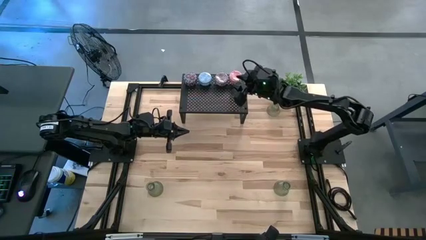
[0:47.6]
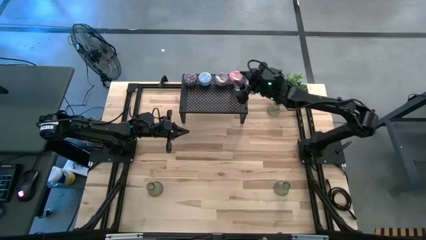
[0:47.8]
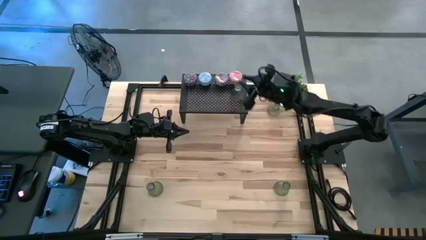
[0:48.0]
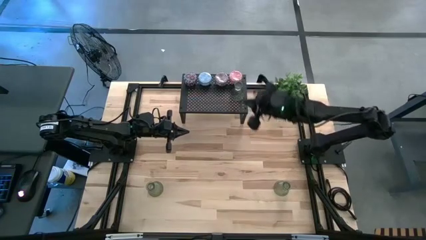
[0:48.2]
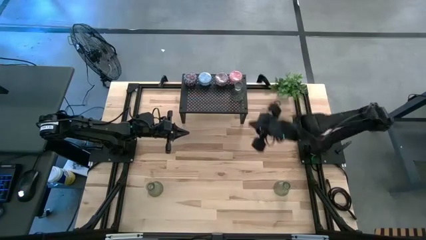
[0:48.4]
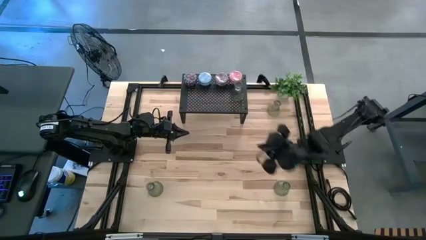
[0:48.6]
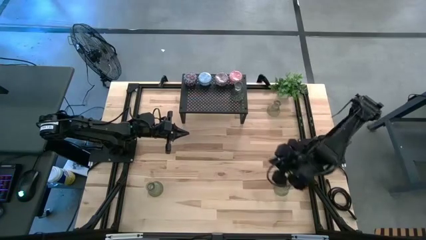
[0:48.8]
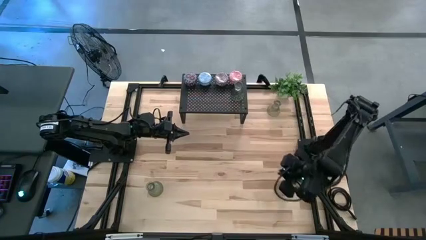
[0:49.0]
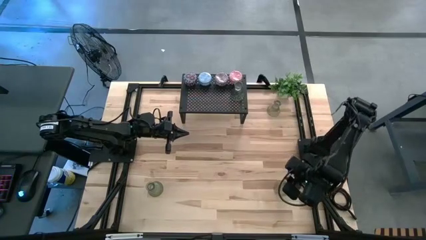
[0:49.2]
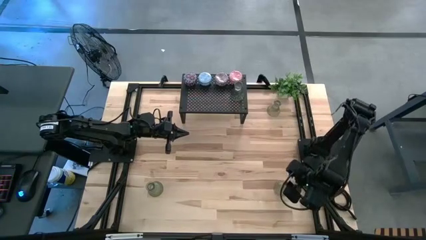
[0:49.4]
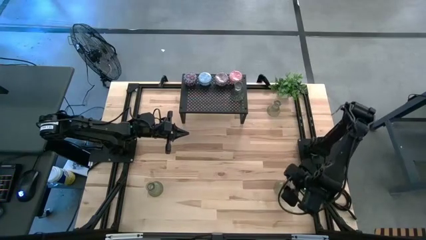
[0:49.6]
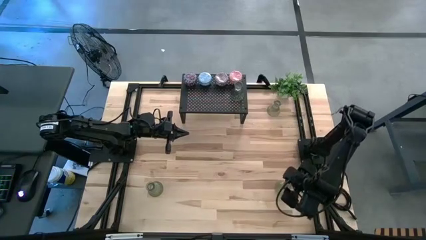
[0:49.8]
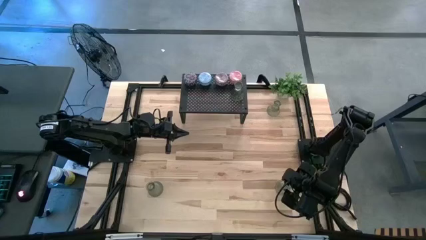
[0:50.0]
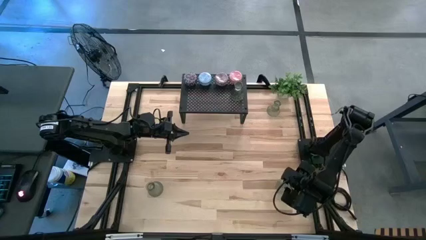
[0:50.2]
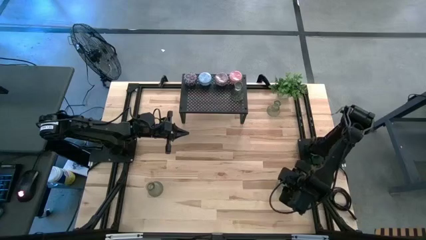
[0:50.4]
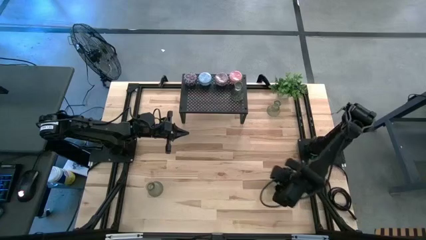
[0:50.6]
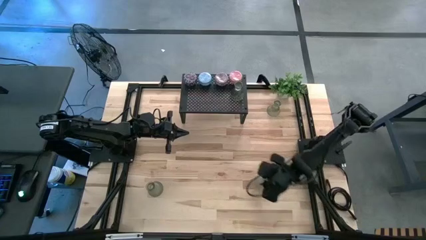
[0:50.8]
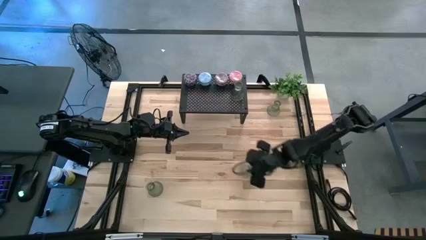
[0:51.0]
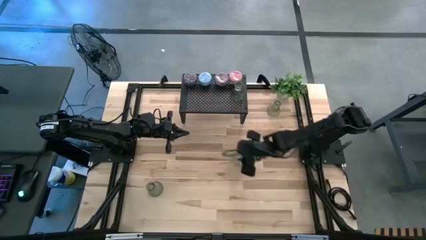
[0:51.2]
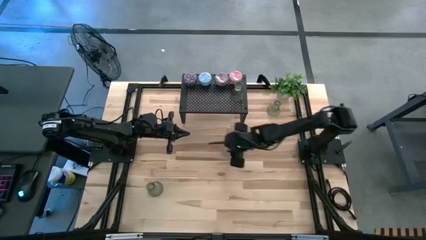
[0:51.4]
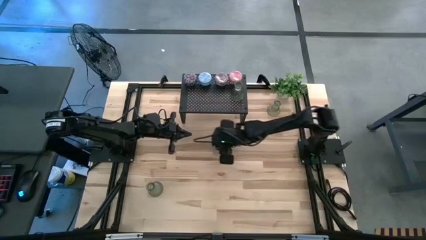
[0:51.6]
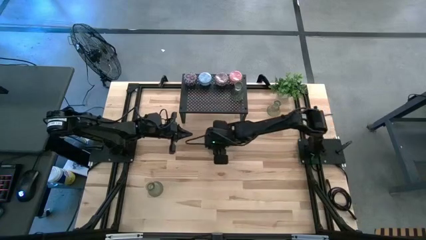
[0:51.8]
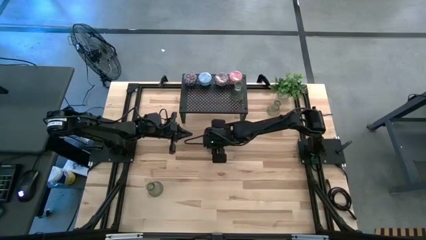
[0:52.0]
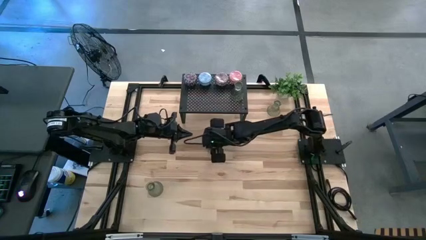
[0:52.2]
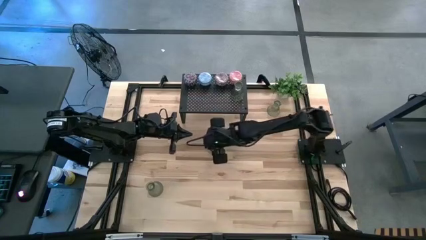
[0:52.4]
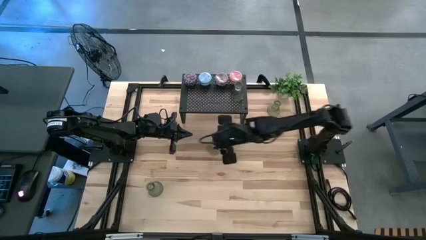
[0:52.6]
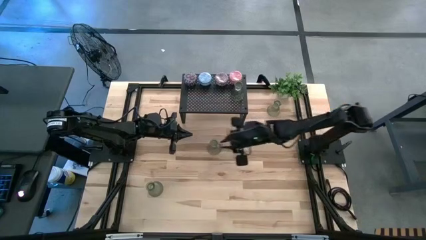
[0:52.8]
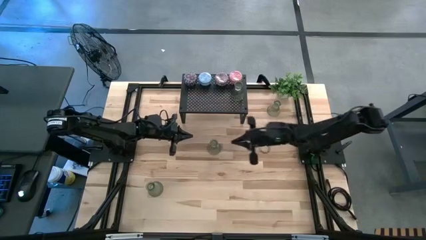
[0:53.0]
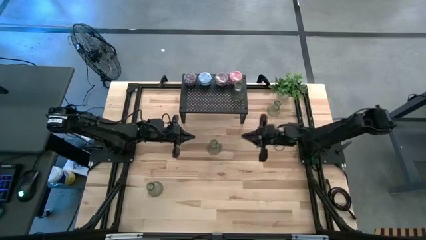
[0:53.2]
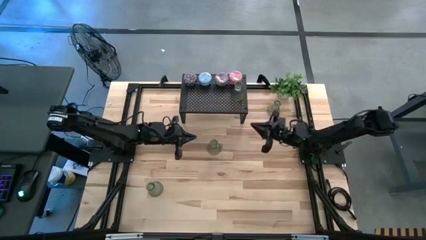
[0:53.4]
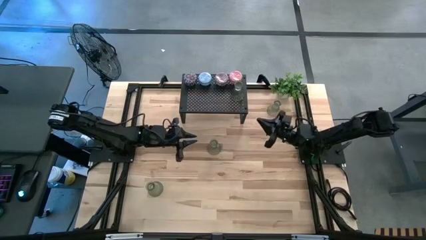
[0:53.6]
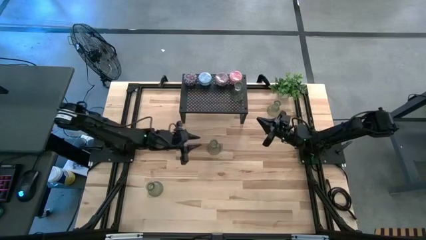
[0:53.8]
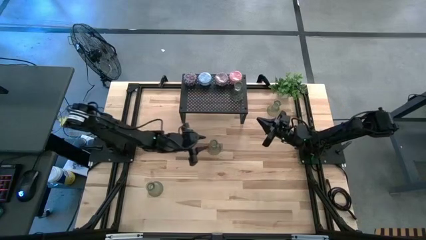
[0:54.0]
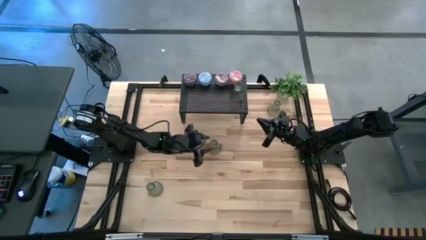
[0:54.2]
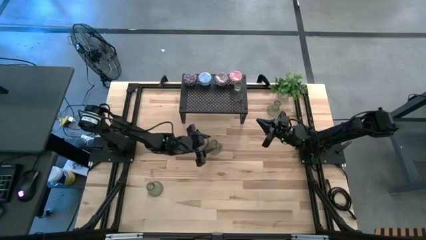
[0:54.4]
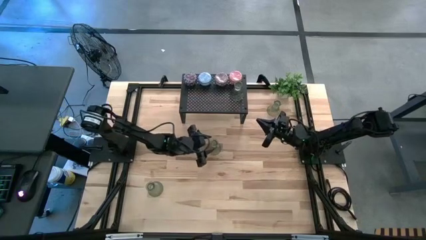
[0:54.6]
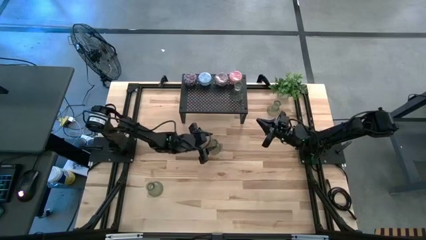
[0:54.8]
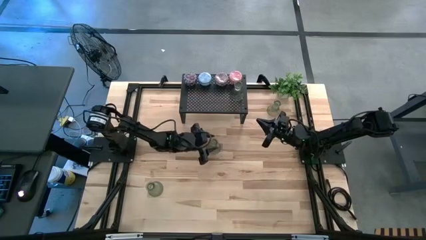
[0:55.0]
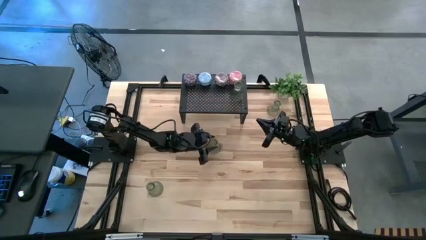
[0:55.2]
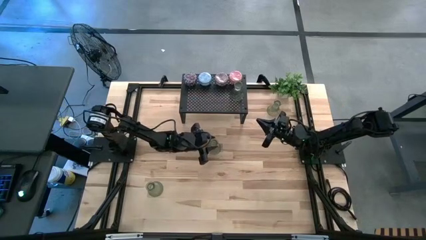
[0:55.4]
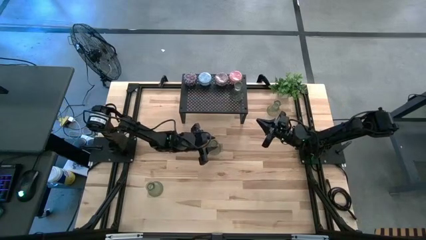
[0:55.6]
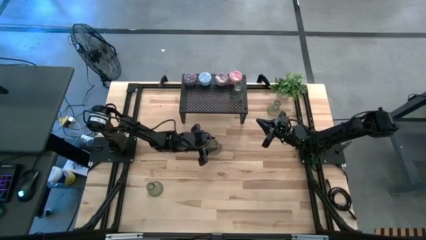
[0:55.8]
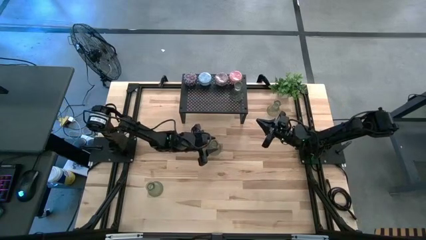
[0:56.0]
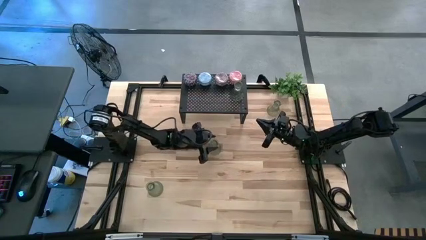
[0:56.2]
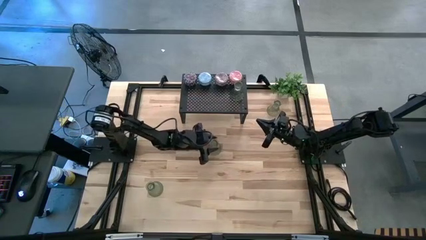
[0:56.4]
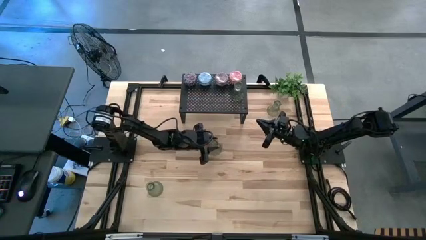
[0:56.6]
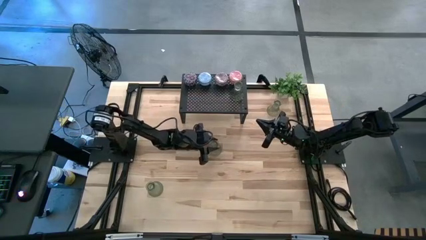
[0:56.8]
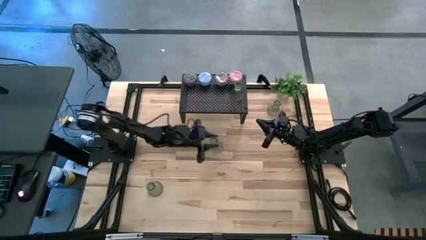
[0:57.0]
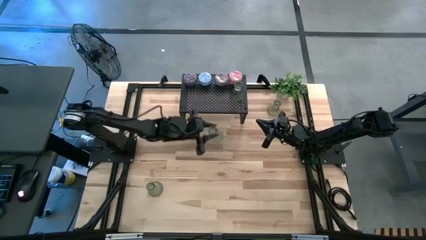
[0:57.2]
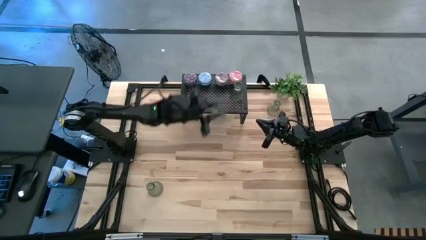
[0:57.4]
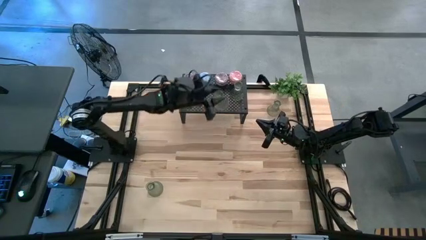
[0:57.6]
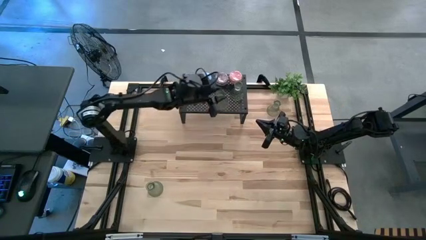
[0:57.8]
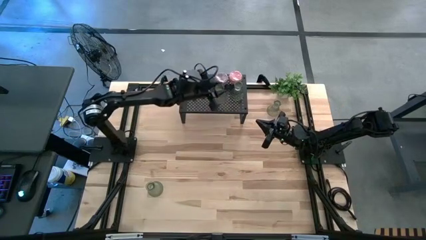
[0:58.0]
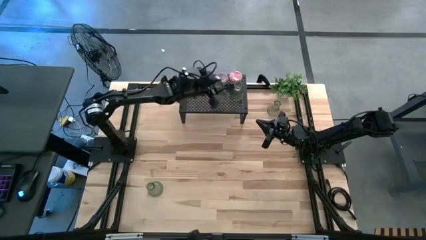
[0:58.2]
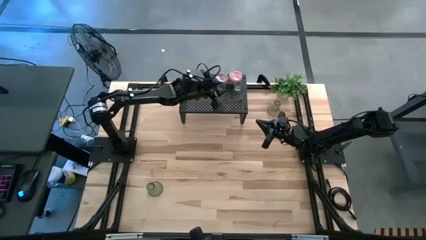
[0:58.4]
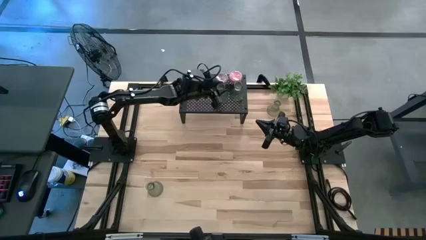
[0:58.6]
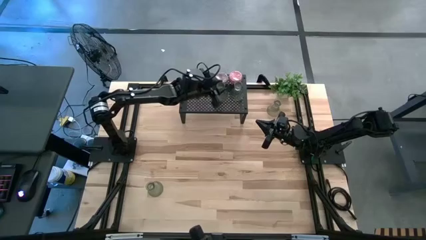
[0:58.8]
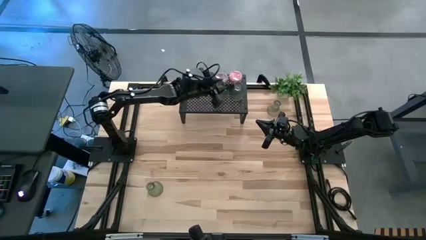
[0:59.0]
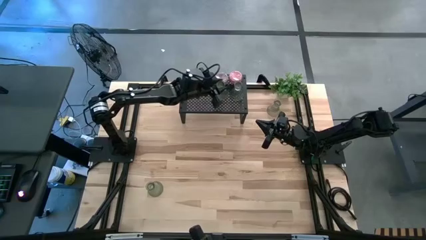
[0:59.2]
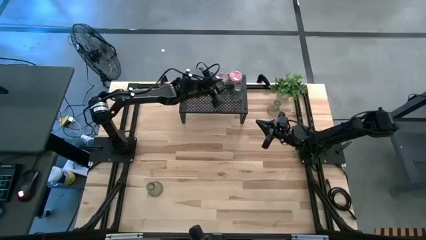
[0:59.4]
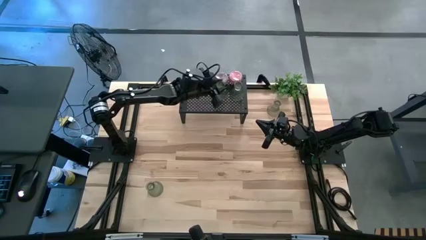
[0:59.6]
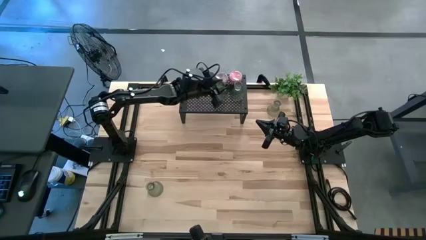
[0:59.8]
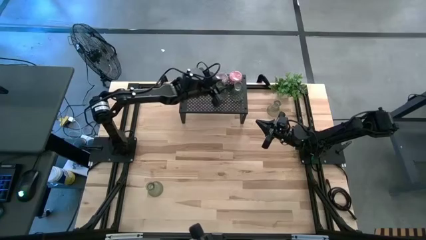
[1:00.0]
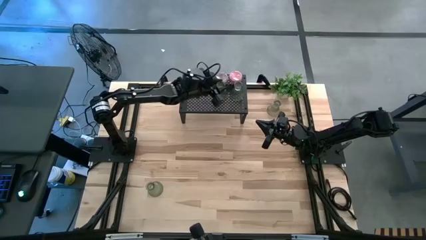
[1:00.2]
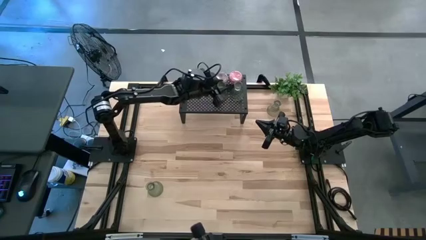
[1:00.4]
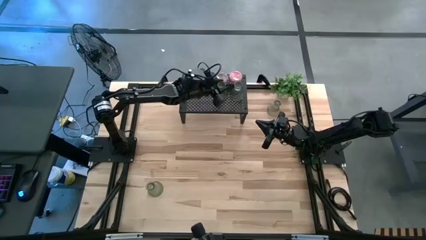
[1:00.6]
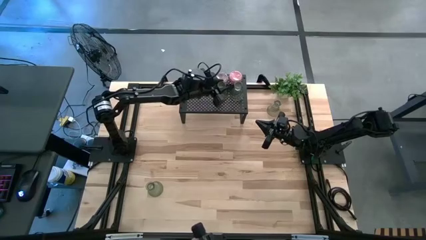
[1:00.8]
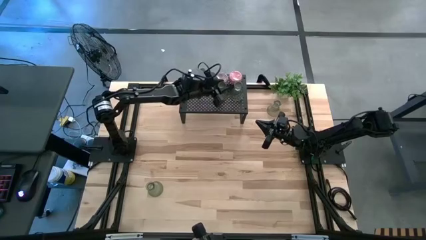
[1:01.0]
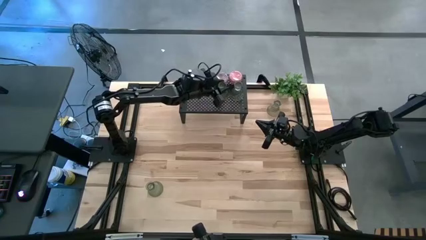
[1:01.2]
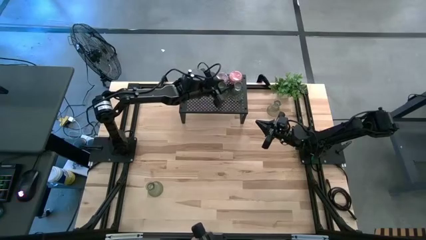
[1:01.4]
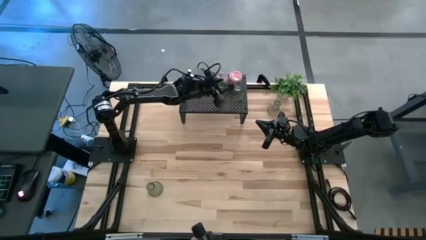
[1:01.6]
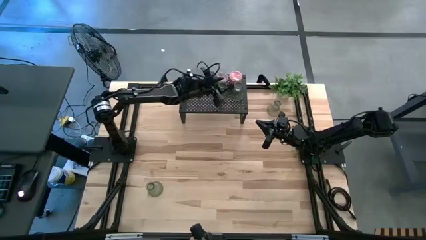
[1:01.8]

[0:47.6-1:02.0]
Task: Pick & Place candle stick holders
Align the candle holder with the other candle holder on the shelf
